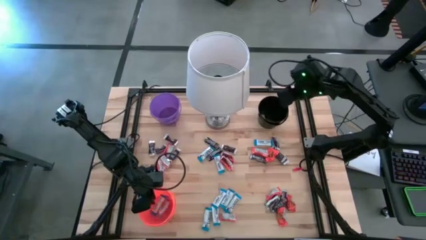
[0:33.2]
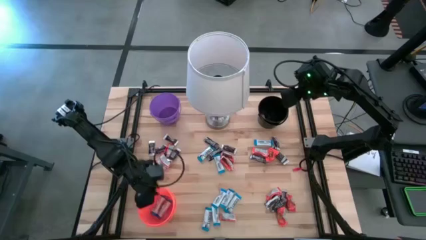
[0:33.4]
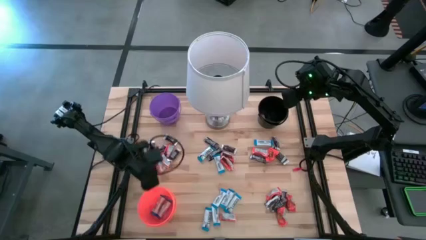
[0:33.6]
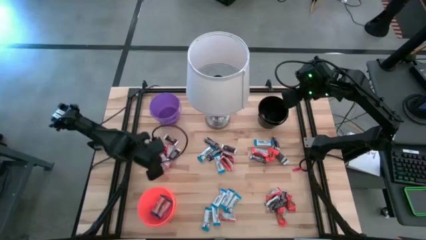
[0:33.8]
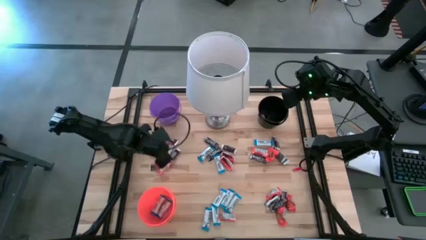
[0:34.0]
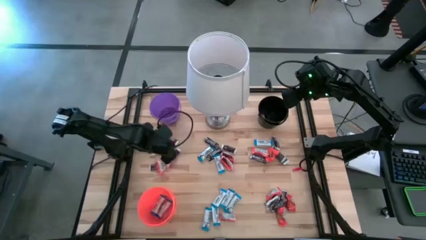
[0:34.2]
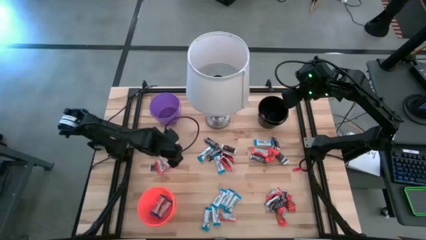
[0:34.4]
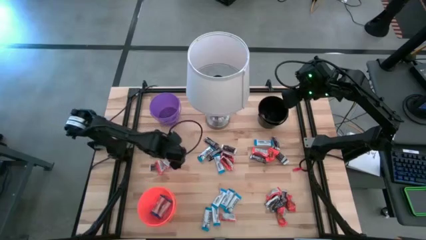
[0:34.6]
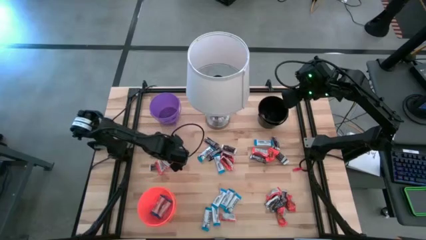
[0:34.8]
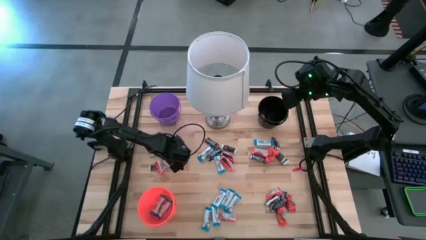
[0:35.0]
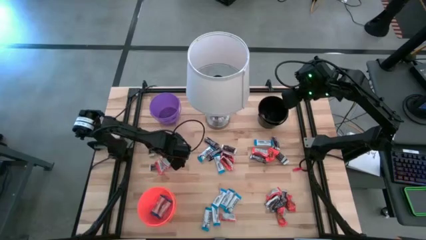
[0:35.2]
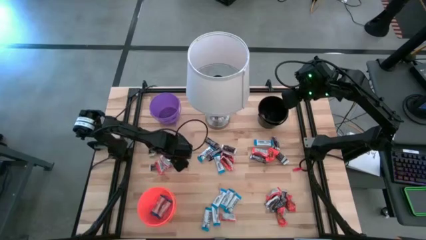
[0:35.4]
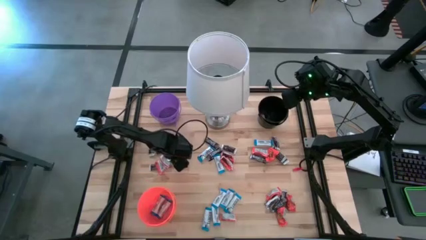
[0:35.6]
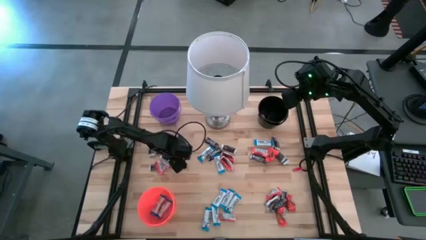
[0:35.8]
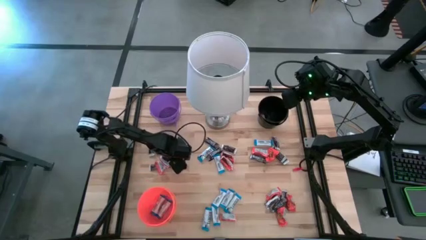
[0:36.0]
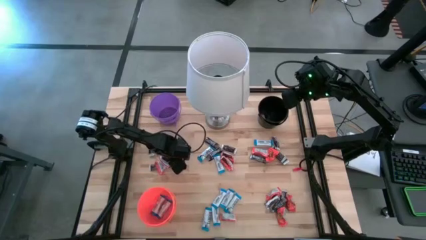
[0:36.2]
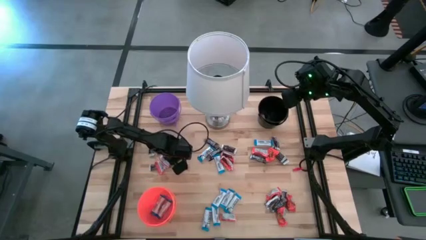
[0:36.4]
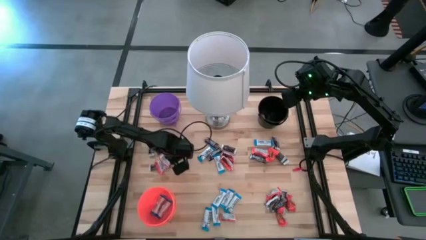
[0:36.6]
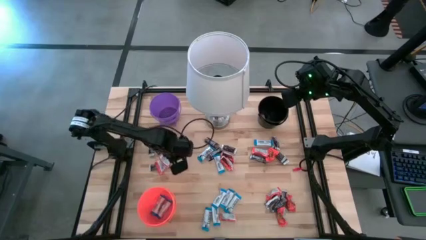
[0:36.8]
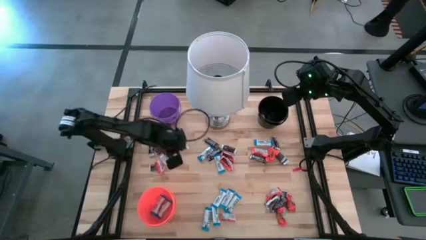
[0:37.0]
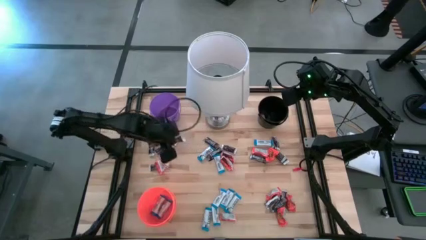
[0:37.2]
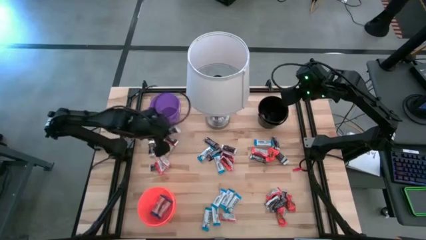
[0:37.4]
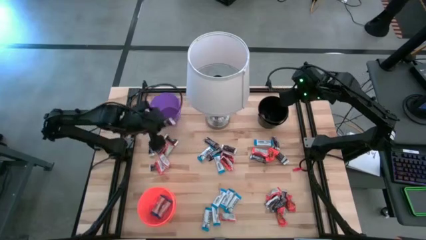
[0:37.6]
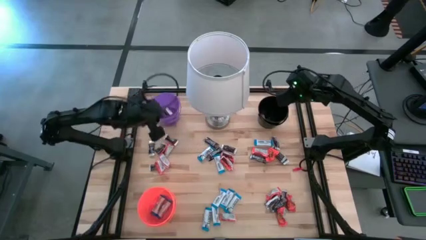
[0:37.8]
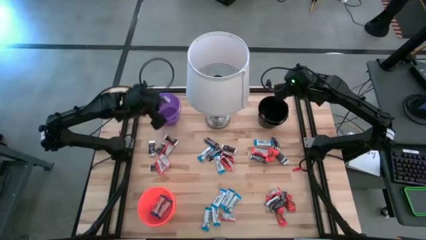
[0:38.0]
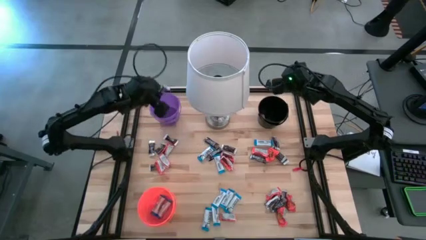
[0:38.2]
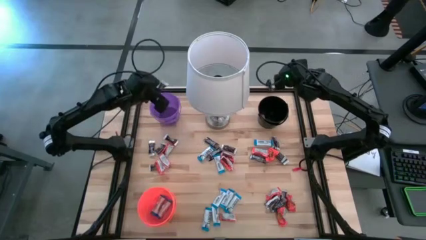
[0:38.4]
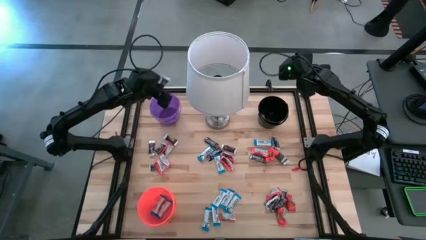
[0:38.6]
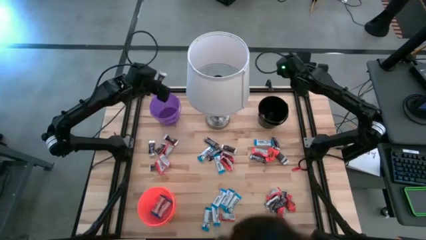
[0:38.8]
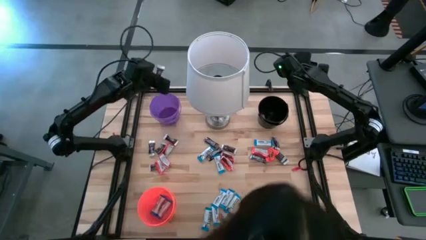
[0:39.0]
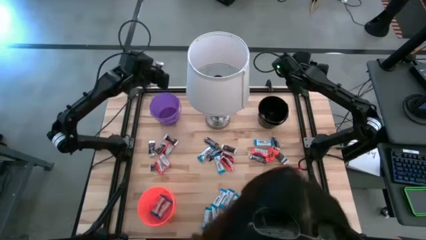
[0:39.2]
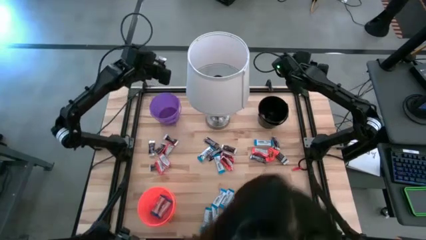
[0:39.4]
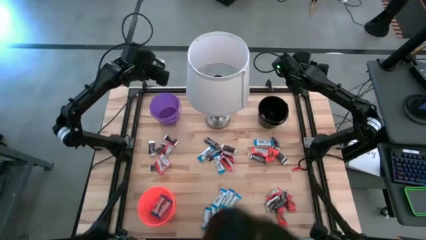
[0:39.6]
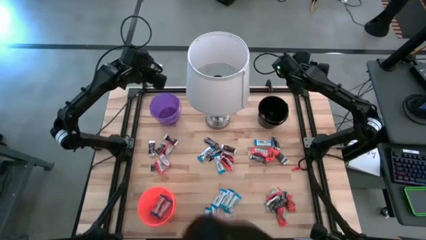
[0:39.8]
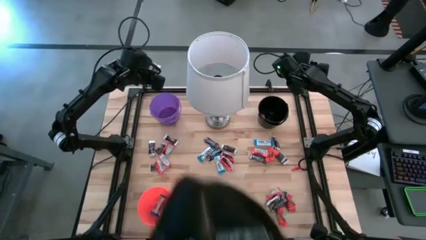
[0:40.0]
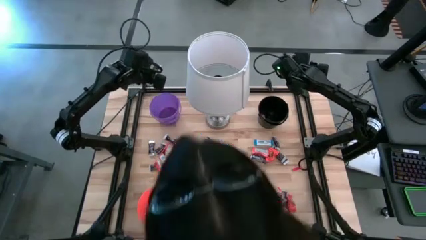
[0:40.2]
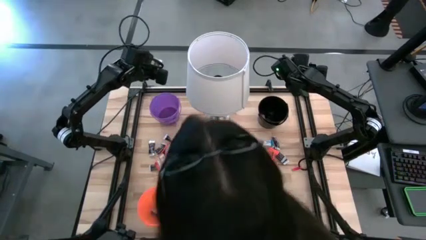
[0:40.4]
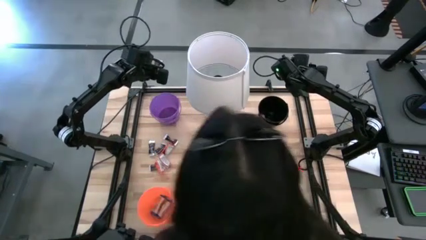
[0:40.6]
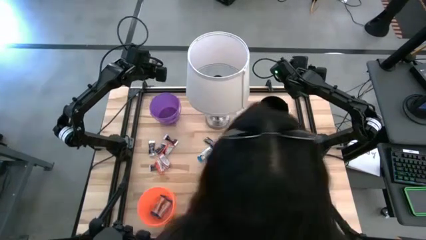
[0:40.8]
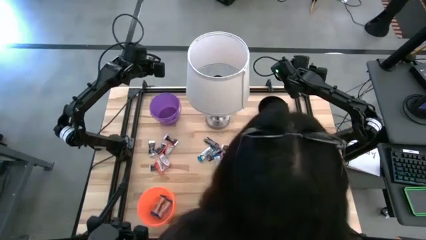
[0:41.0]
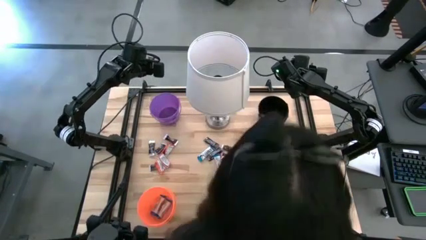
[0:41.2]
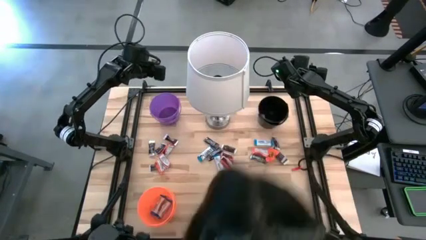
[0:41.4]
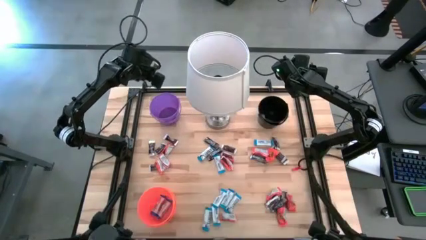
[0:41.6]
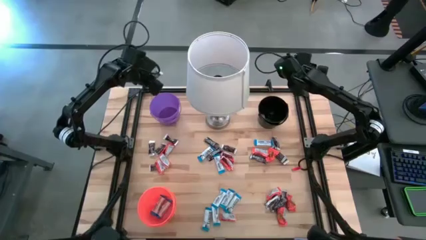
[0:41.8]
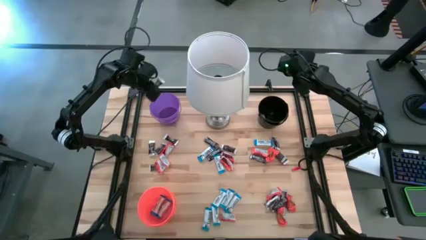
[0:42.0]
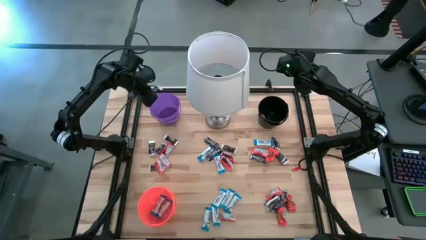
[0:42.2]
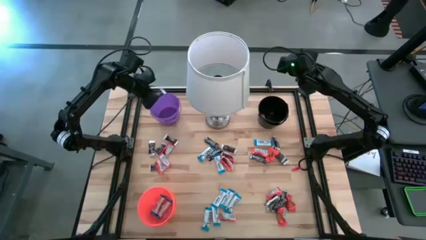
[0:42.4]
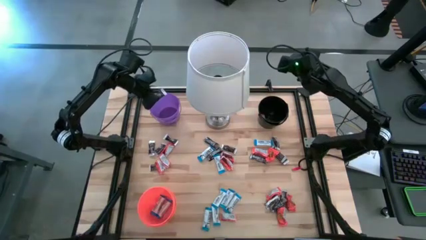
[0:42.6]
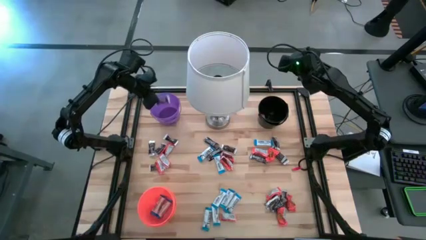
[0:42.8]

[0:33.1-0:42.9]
Task: Organize candy in baskets
Put the brown chocolate bar into the purple bucket

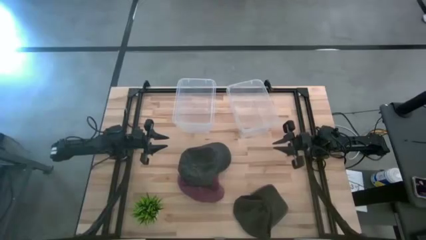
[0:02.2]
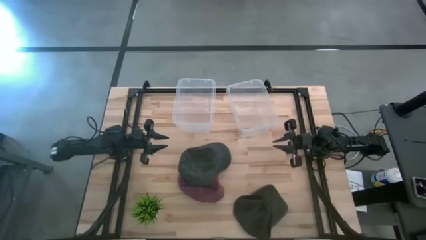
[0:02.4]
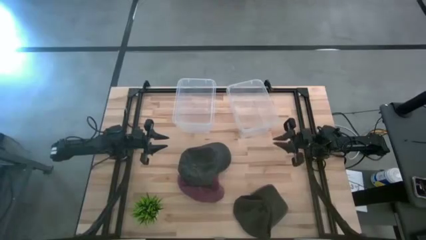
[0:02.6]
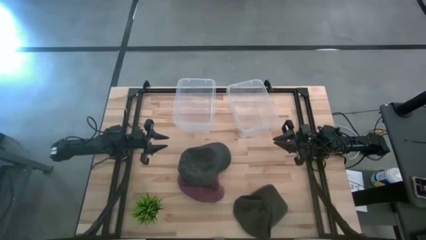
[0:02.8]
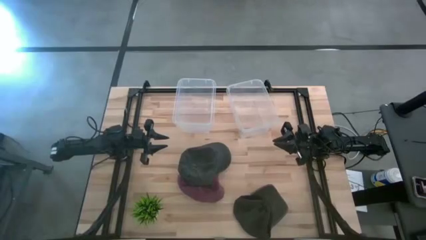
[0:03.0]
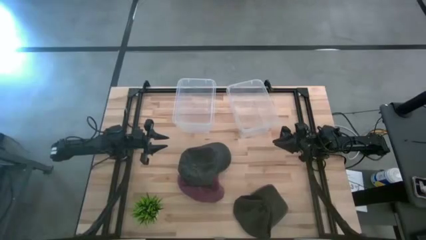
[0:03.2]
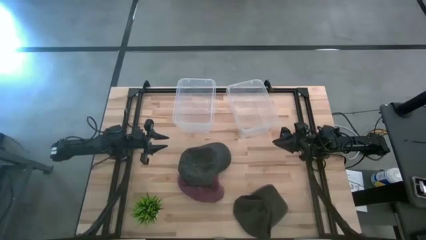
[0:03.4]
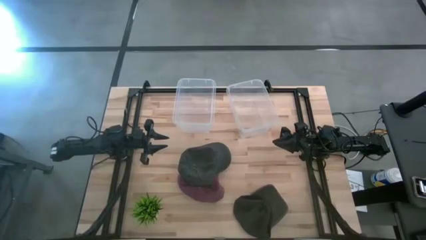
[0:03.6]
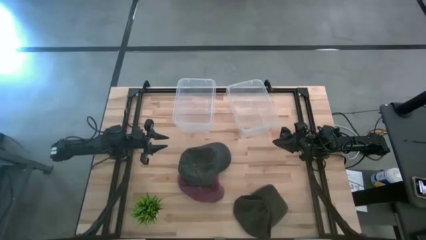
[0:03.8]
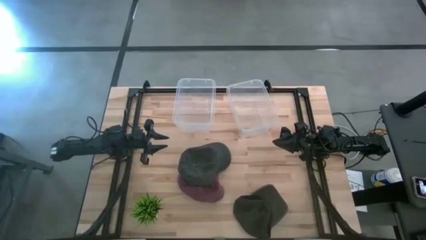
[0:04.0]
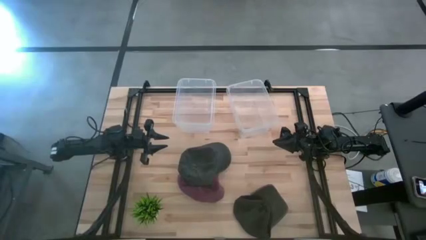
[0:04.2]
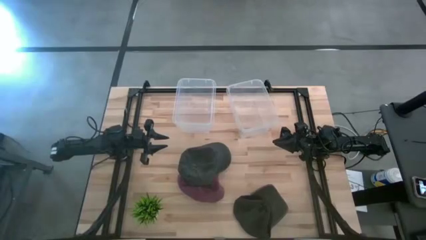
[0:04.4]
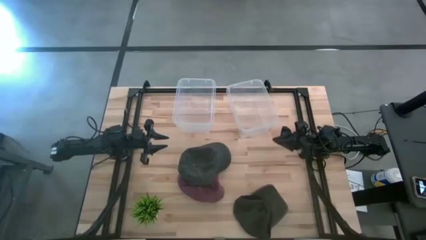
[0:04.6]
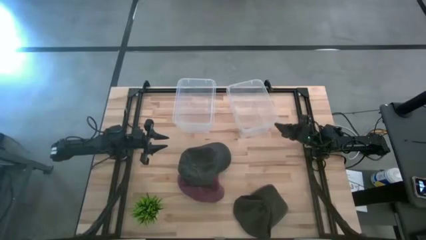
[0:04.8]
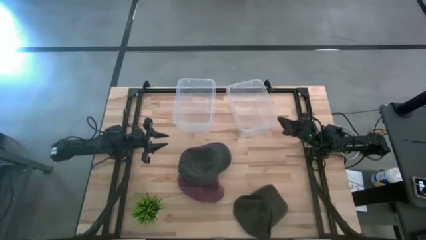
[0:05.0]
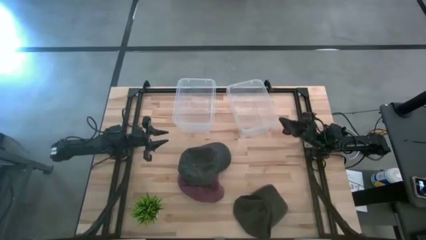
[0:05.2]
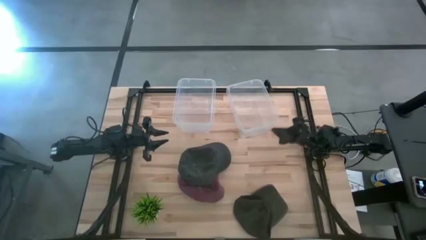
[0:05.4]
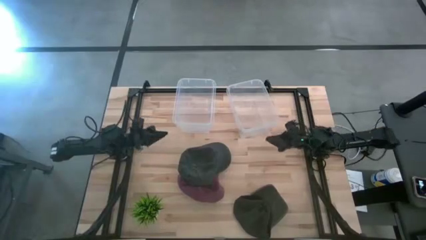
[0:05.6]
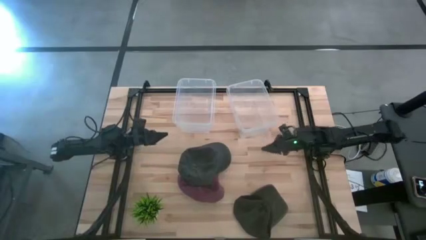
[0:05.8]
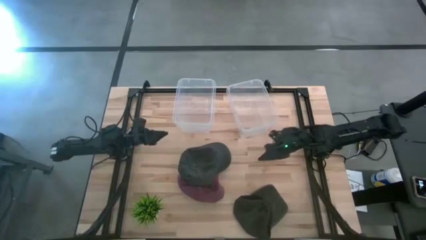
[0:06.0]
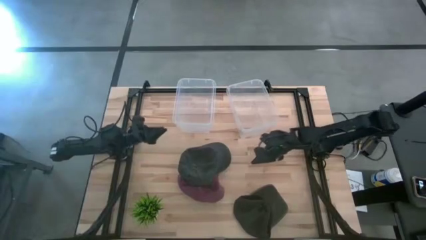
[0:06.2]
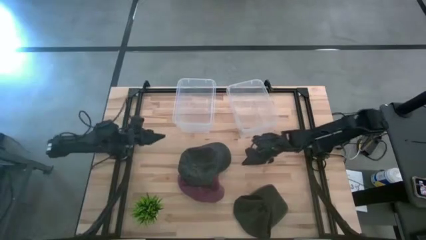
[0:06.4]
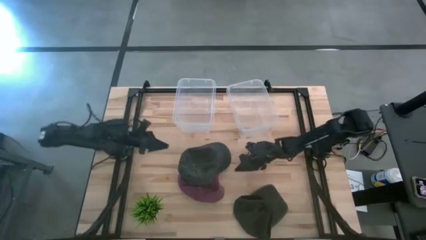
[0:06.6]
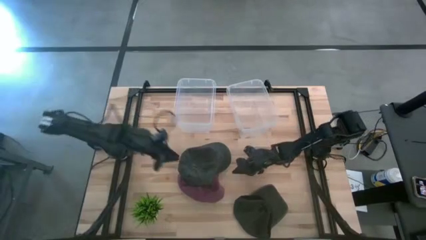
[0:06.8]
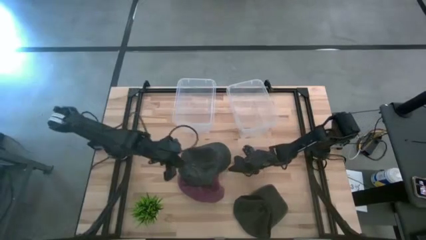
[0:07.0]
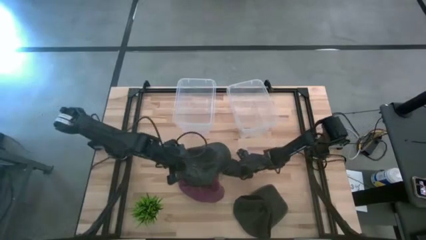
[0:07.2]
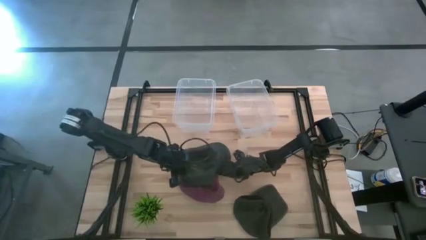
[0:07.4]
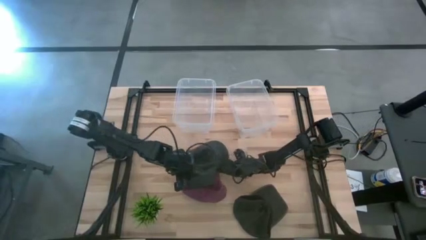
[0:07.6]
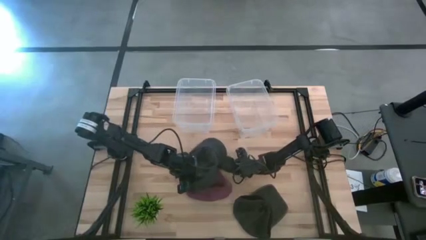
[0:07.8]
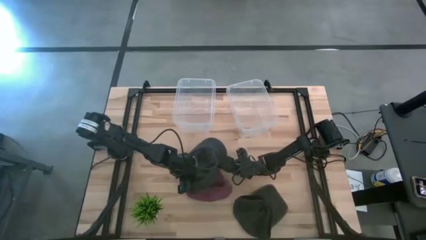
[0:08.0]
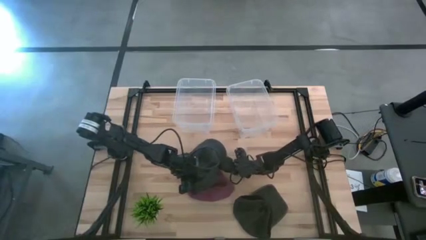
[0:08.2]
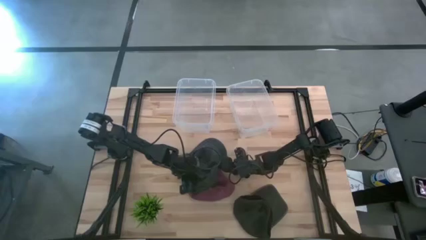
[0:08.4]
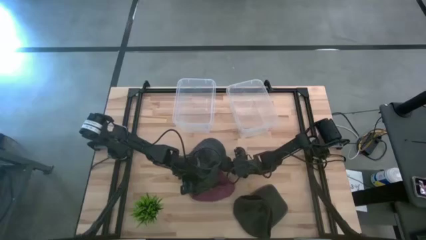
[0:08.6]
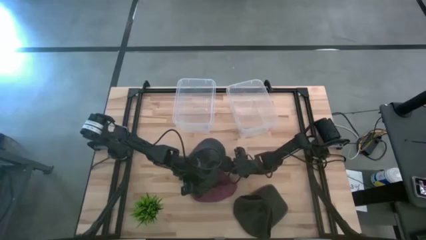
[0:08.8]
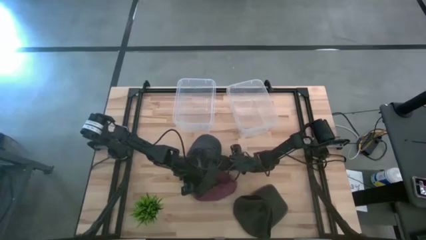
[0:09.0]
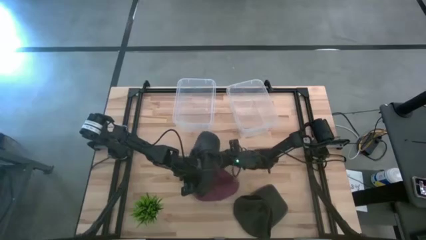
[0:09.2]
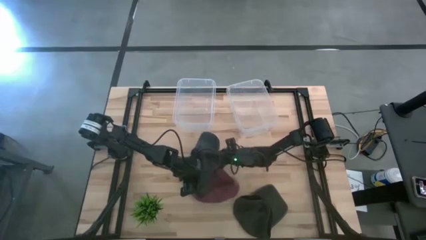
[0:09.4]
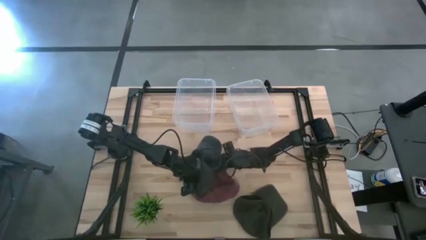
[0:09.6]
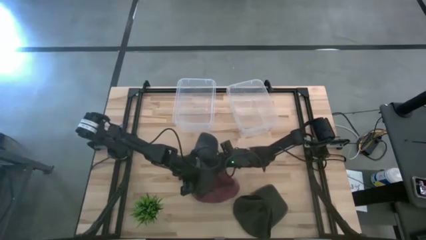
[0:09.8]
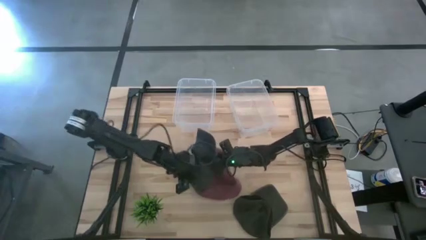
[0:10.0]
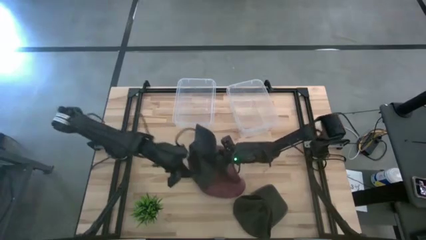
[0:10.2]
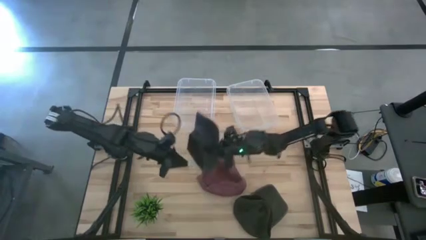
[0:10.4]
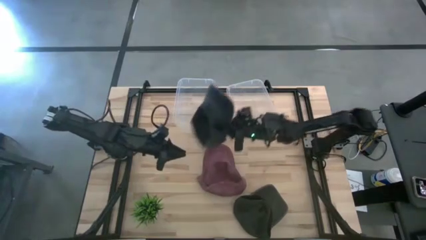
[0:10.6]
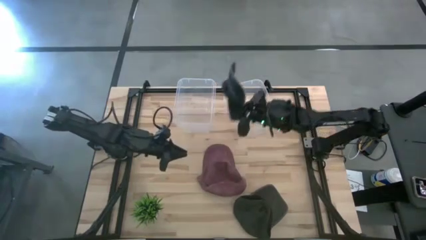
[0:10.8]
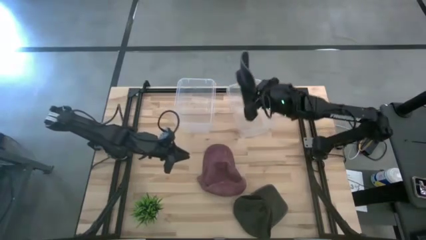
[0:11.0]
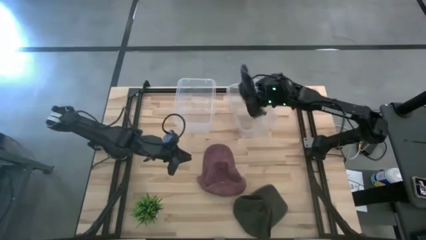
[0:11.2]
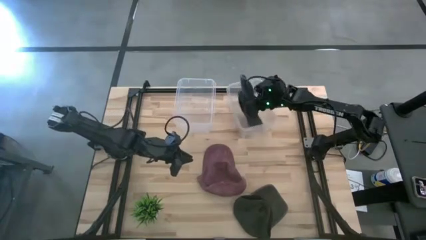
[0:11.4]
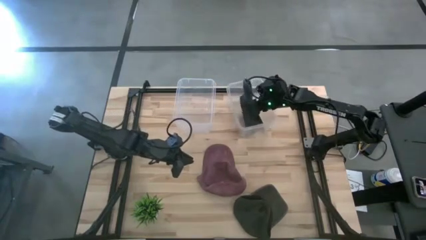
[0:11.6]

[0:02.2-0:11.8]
Task: Pick and place caps into container
Put the top black cap into the right transparent container
